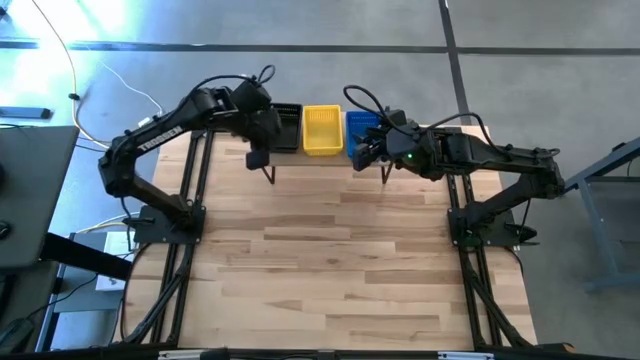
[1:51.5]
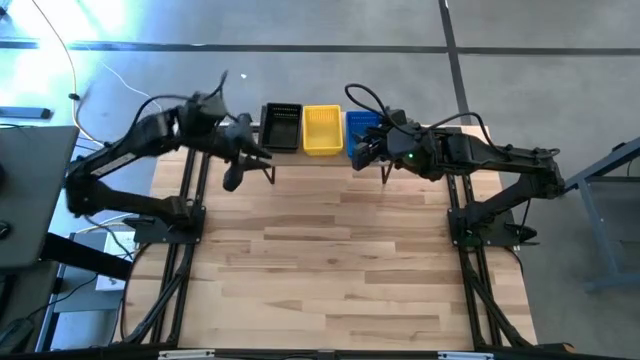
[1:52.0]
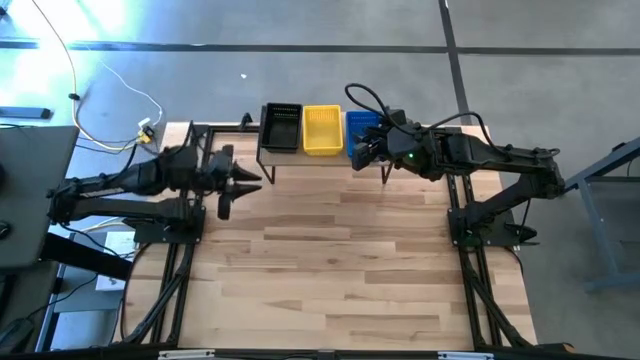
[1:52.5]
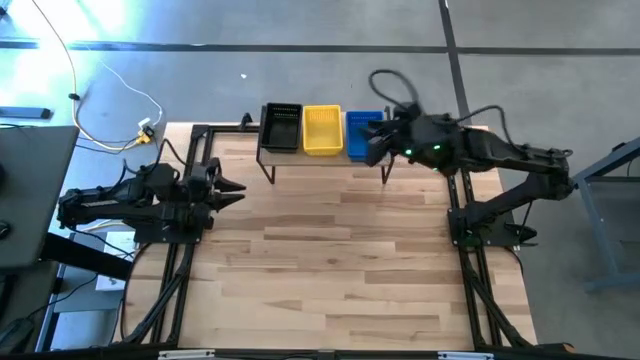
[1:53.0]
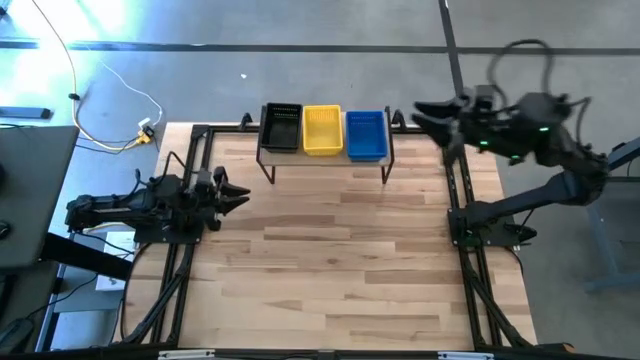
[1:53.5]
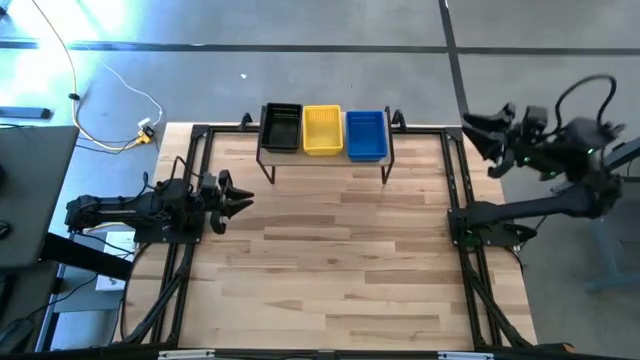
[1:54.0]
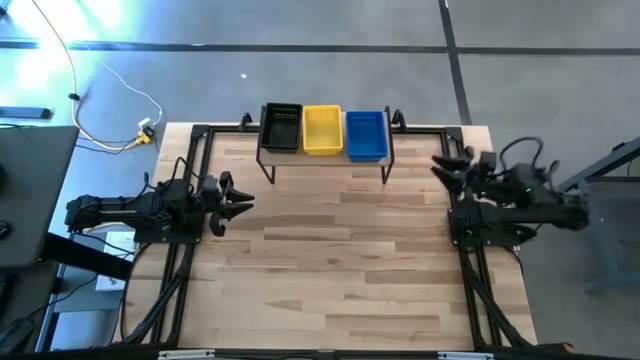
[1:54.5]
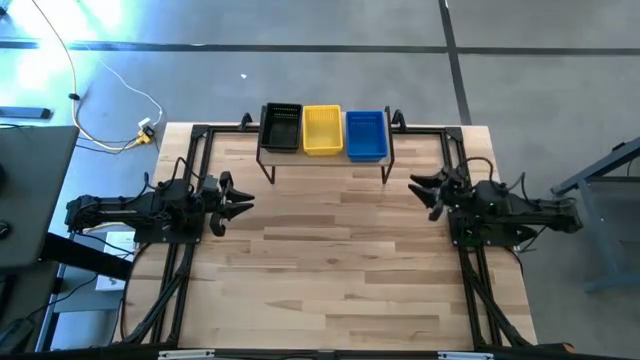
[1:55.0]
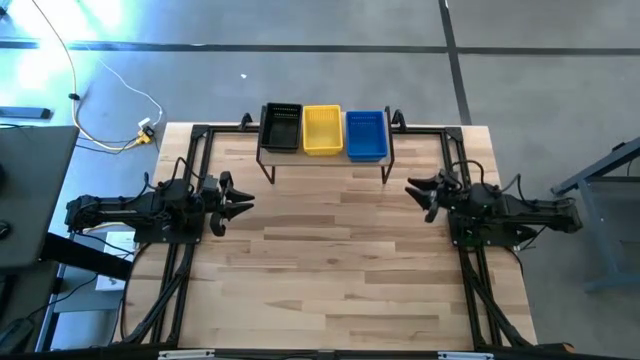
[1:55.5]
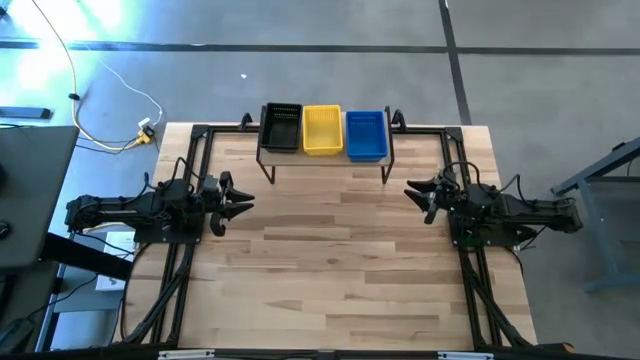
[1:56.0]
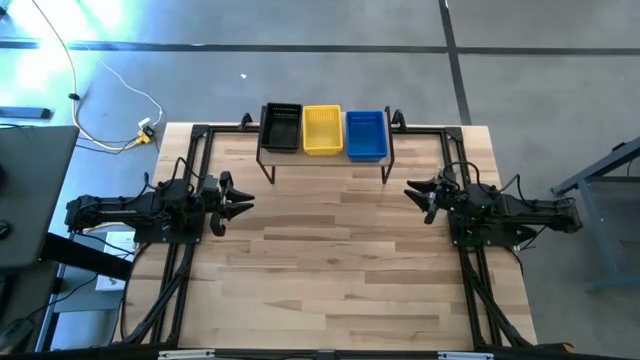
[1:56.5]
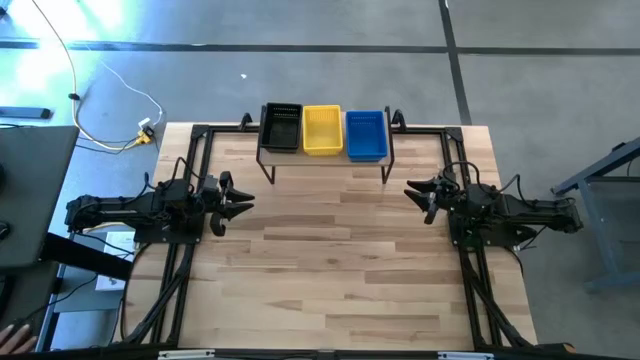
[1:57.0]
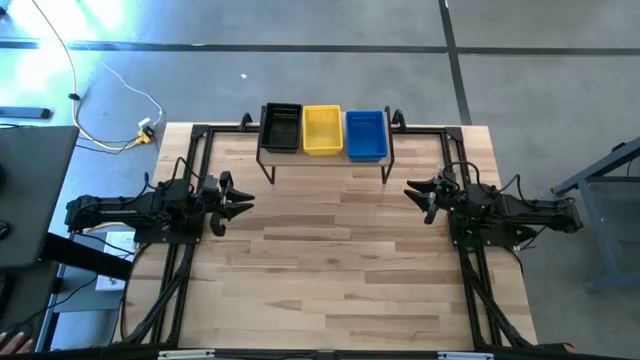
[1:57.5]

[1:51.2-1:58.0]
Task: Stack baskets on shelf by color
Return to Home Position

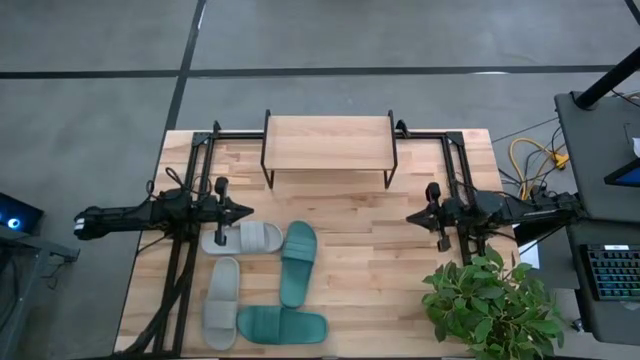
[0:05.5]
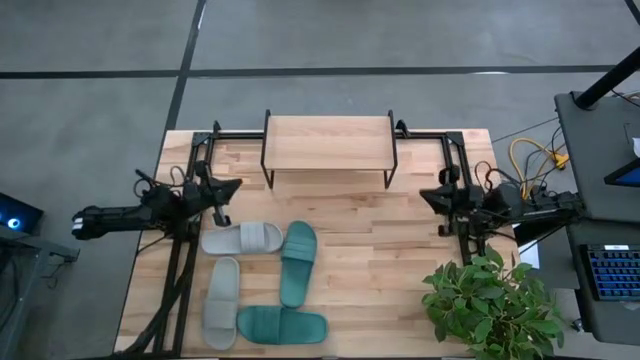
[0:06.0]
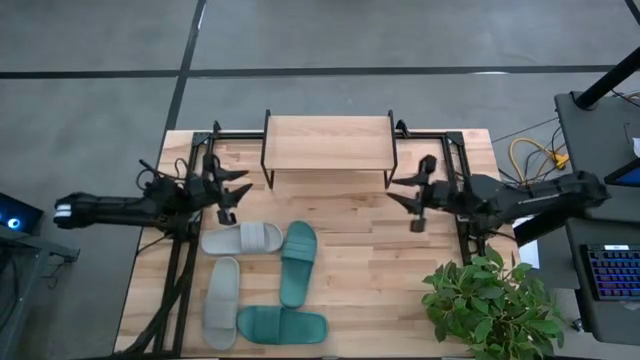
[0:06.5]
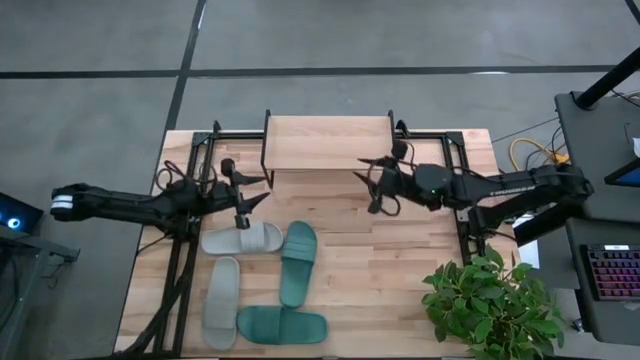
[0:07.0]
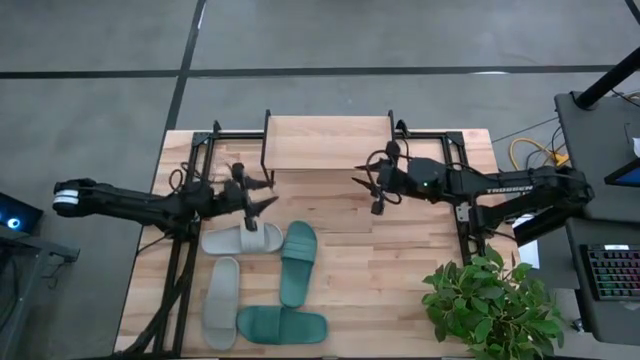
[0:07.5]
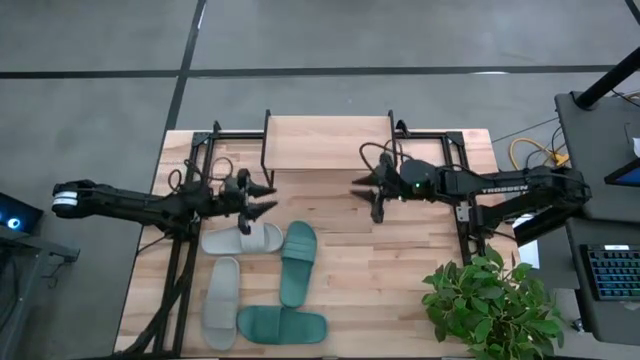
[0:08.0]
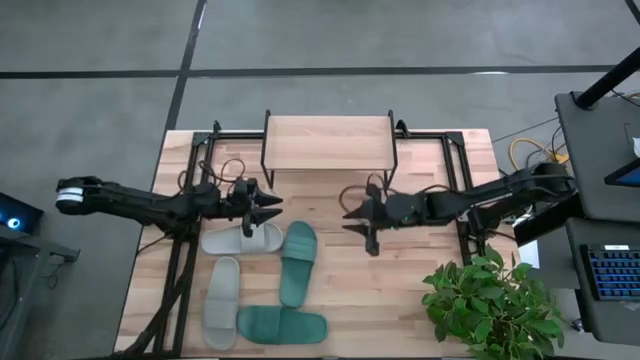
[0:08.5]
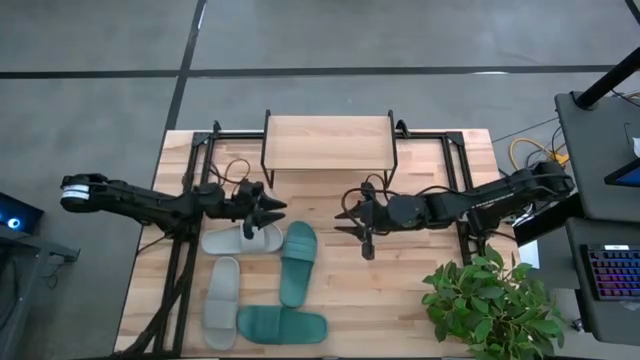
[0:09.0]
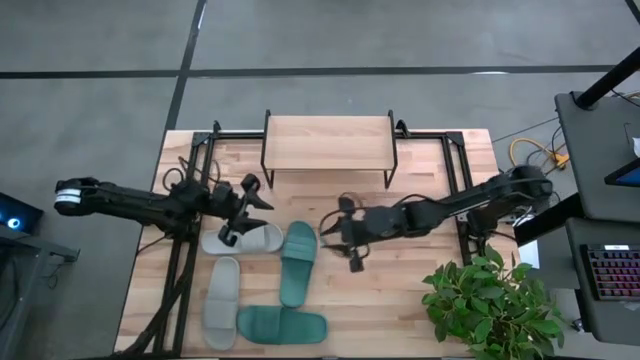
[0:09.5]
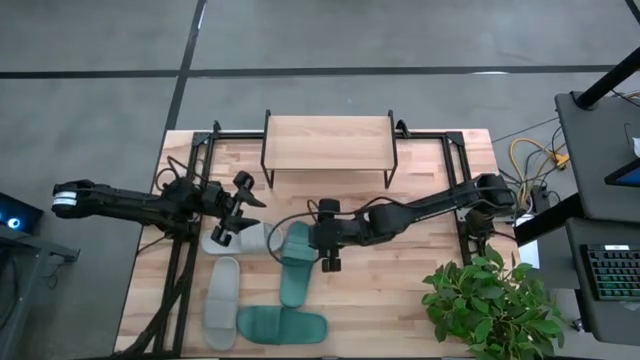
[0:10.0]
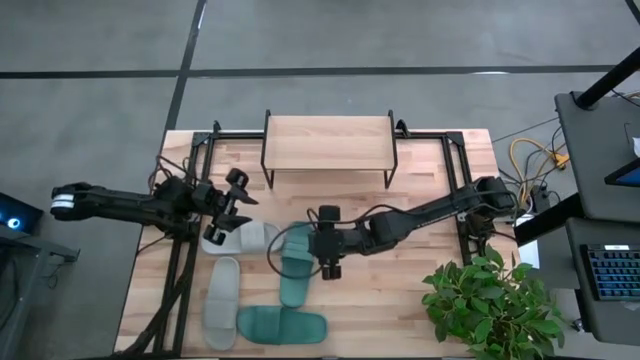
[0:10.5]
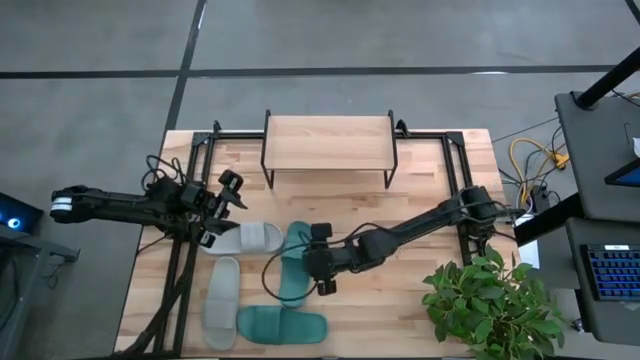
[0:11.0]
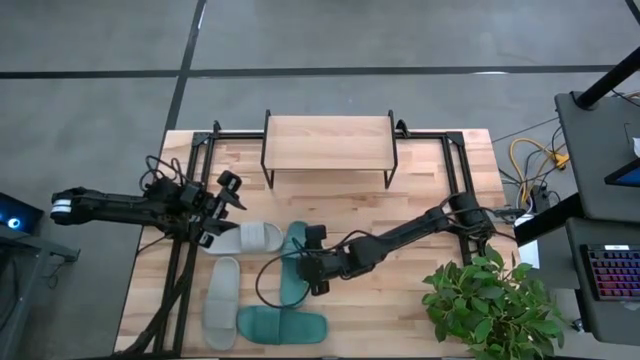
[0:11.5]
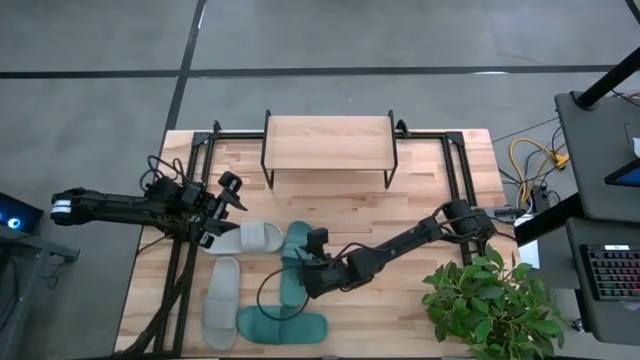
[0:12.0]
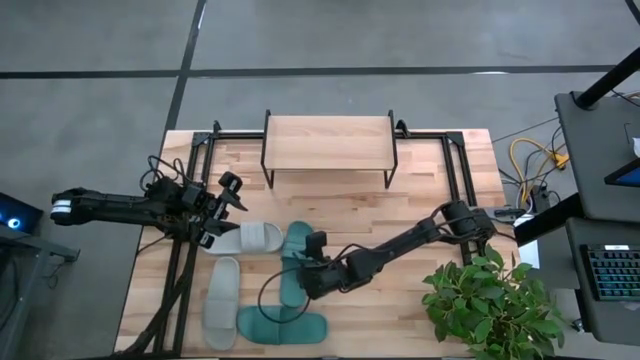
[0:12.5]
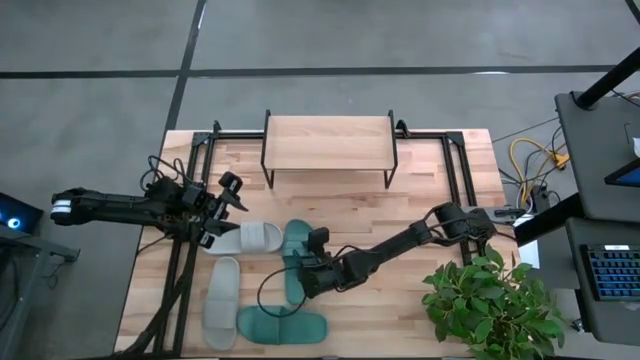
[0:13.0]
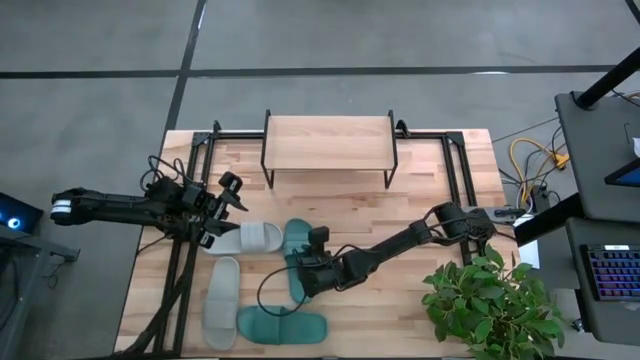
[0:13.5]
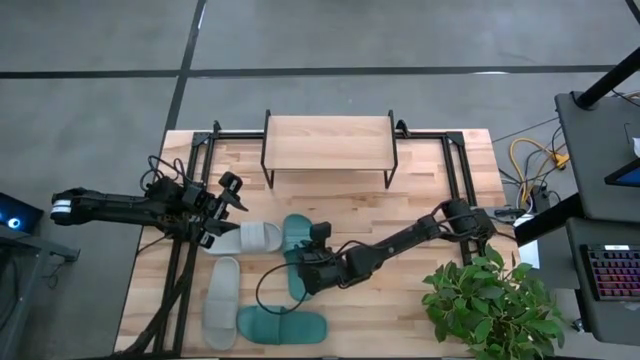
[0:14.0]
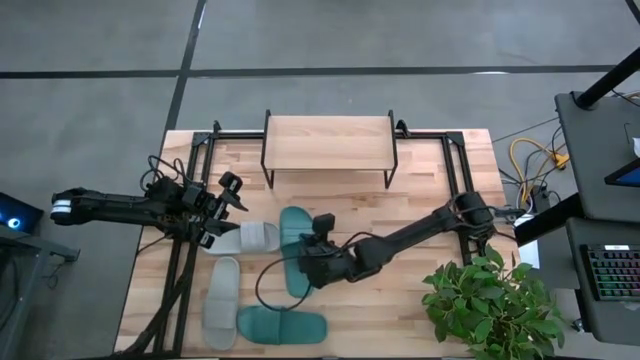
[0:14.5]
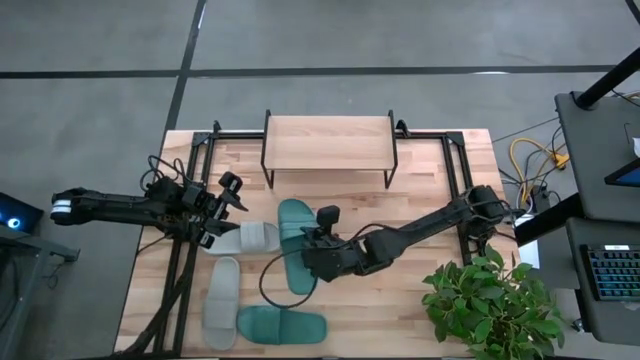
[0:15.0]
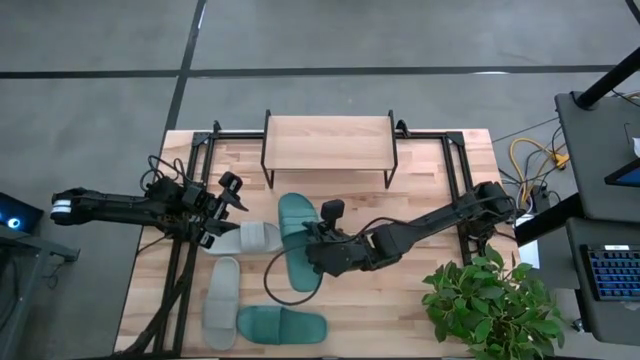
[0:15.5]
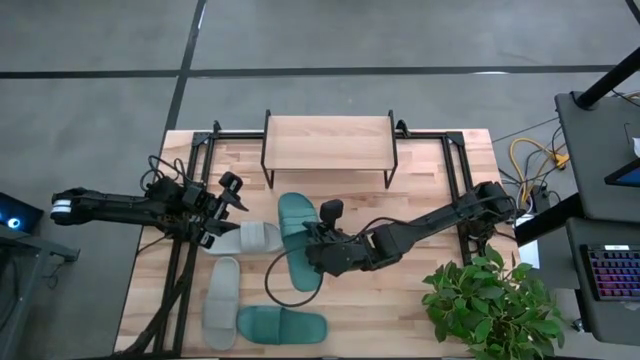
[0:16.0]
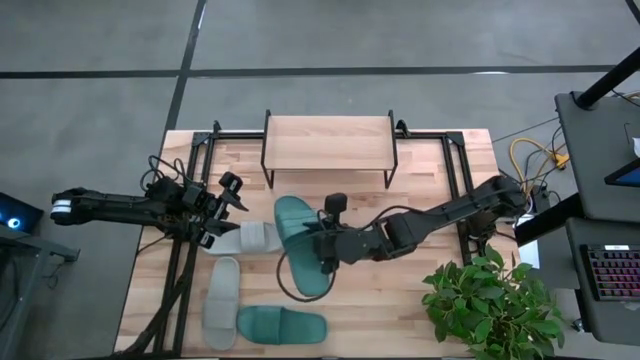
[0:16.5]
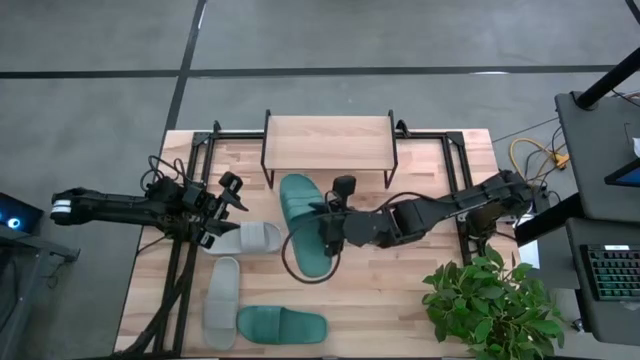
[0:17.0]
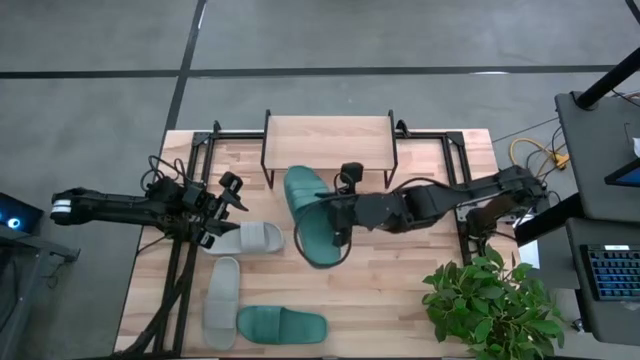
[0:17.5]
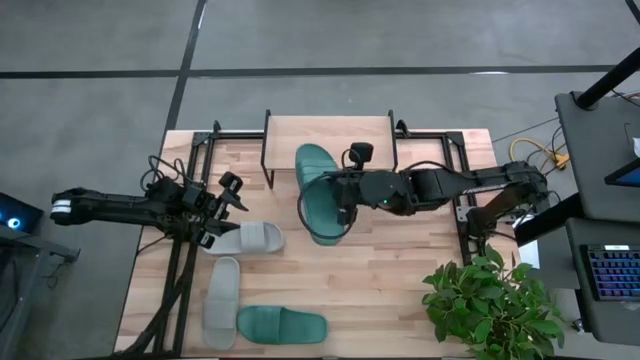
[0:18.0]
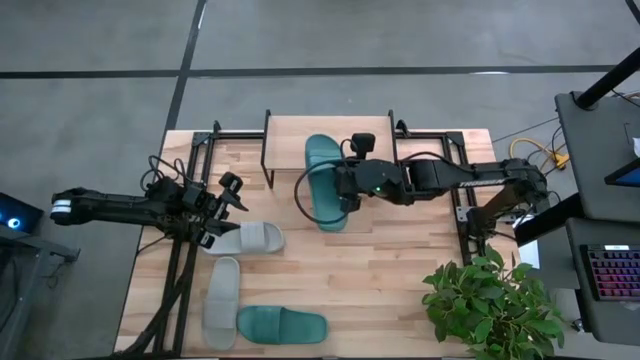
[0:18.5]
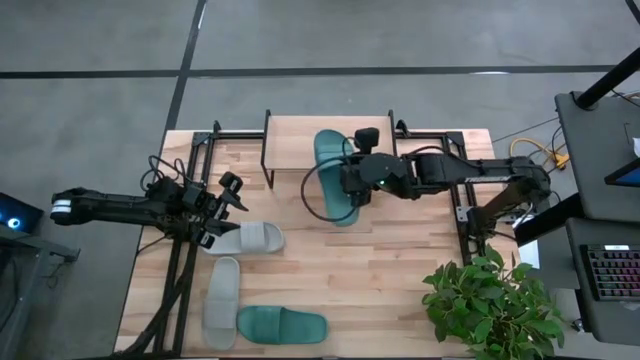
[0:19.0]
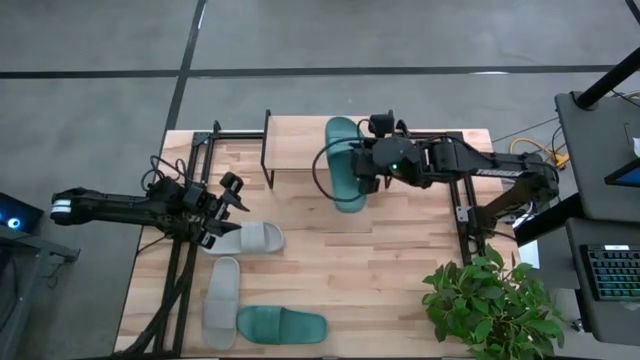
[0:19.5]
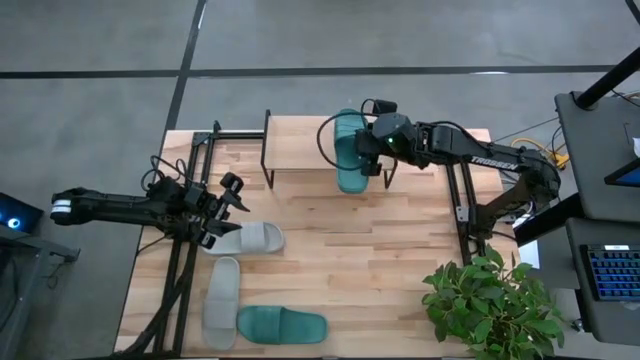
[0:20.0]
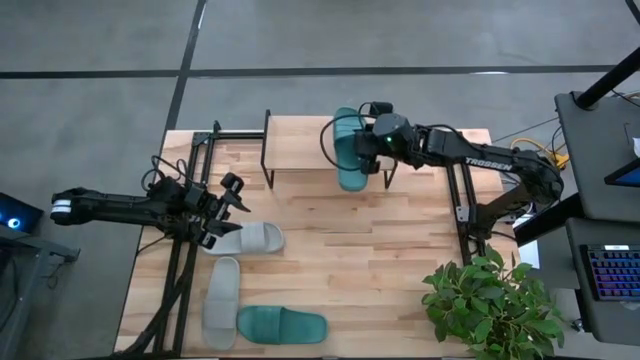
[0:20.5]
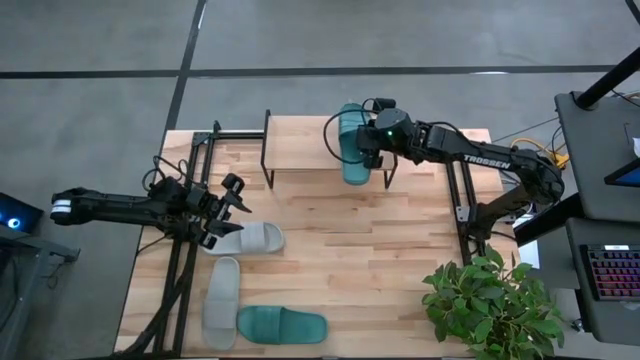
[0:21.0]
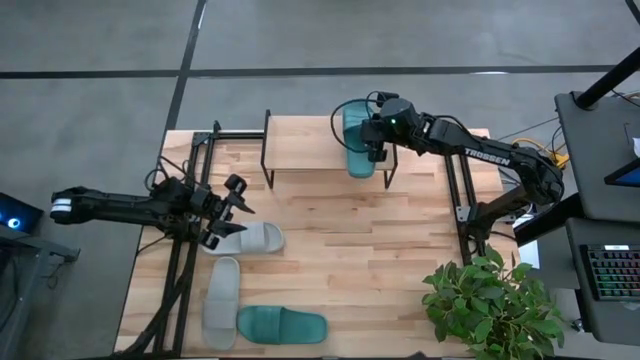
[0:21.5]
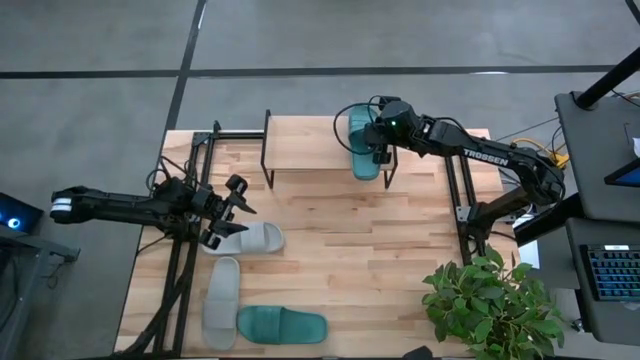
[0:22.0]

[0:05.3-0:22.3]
Task: Pick and place slides into the shelf
Put the top green slide on the shelf
